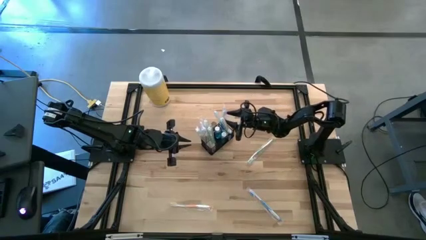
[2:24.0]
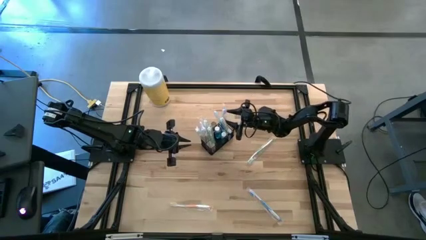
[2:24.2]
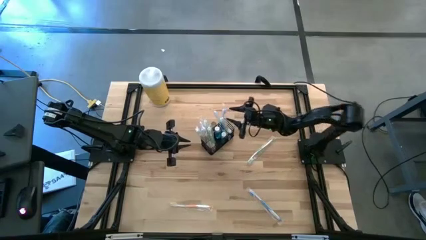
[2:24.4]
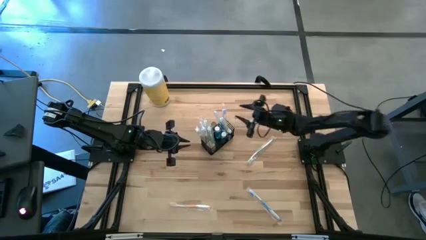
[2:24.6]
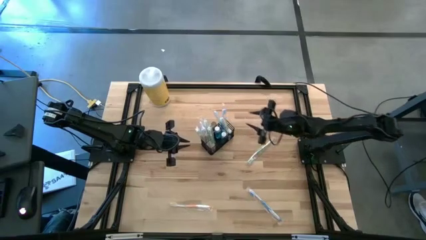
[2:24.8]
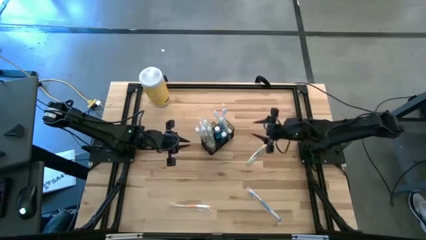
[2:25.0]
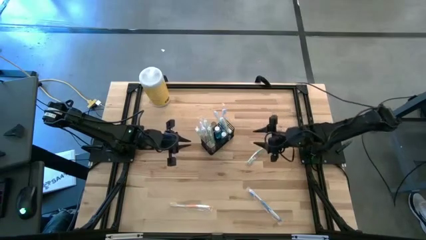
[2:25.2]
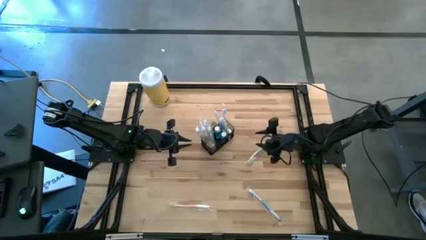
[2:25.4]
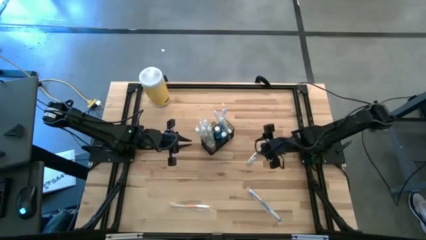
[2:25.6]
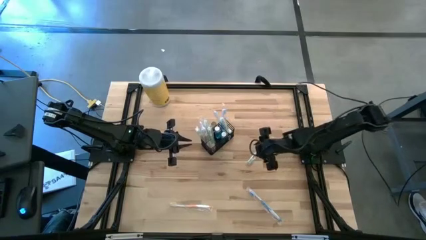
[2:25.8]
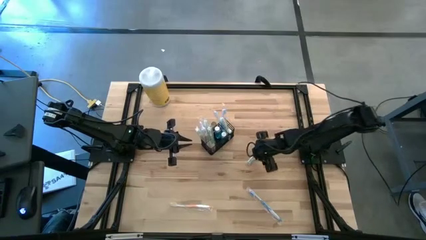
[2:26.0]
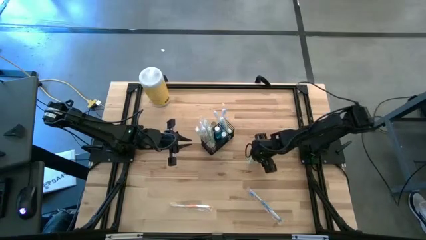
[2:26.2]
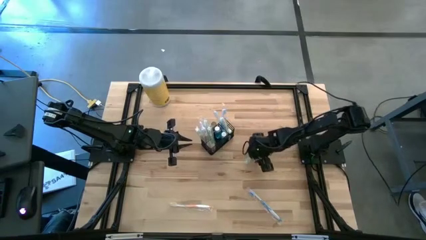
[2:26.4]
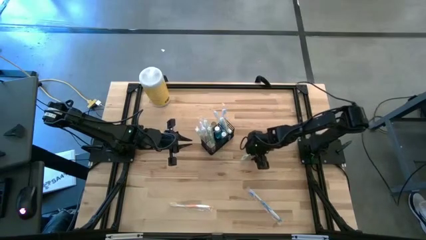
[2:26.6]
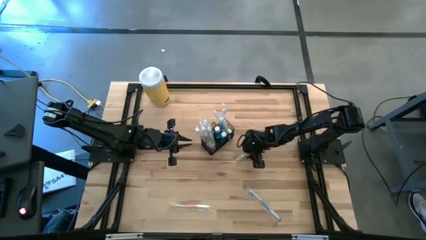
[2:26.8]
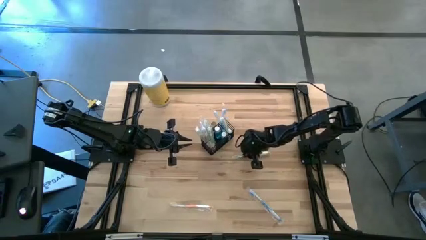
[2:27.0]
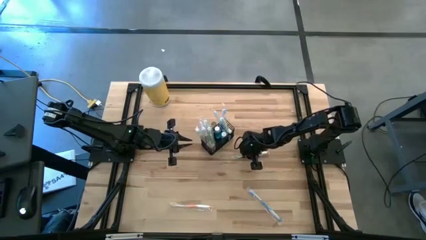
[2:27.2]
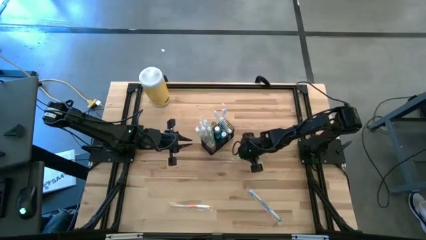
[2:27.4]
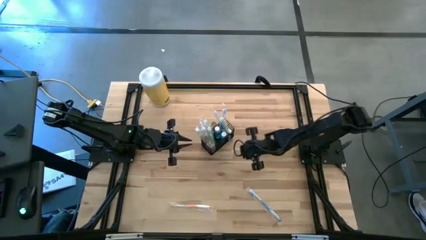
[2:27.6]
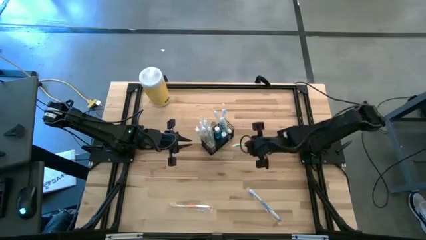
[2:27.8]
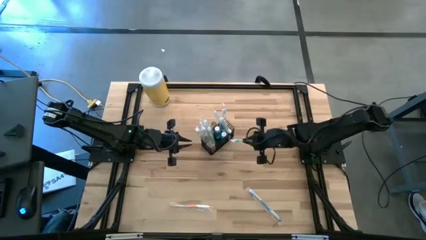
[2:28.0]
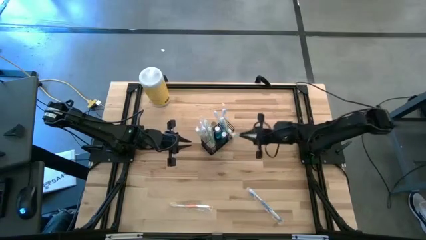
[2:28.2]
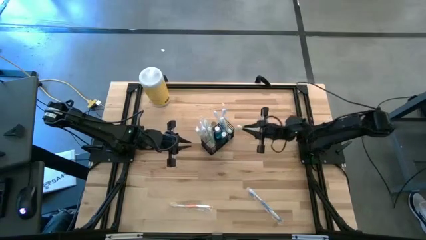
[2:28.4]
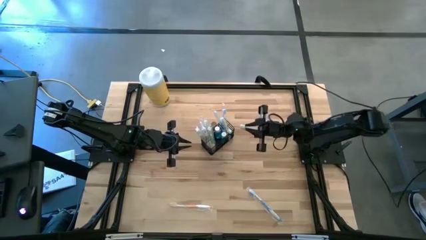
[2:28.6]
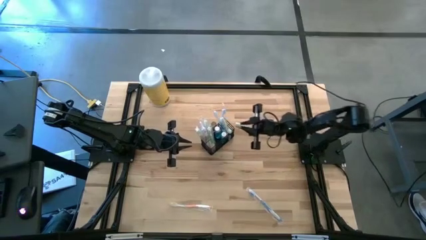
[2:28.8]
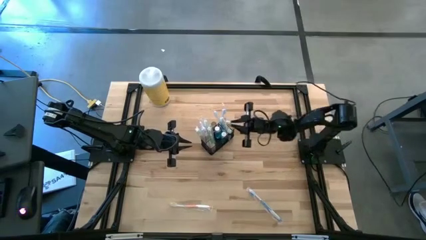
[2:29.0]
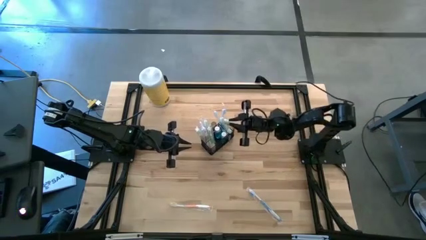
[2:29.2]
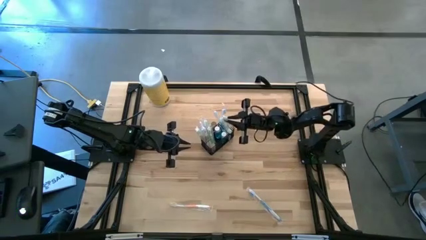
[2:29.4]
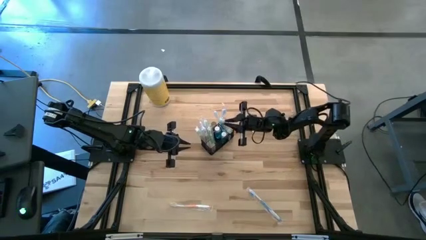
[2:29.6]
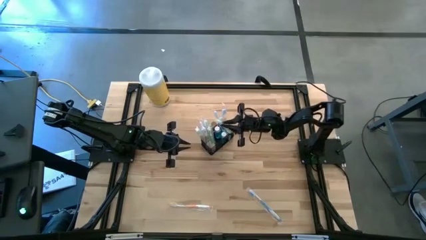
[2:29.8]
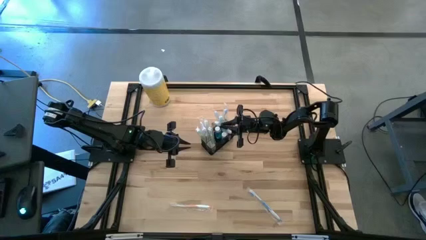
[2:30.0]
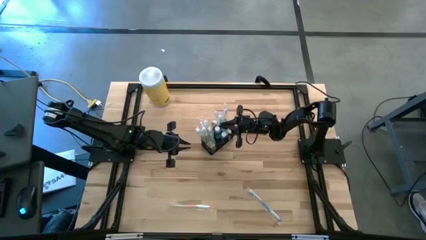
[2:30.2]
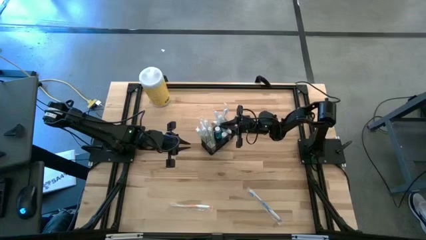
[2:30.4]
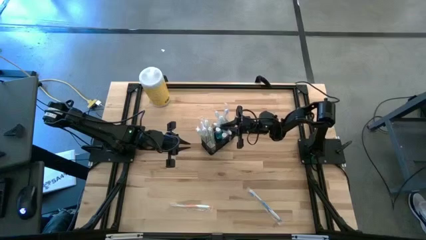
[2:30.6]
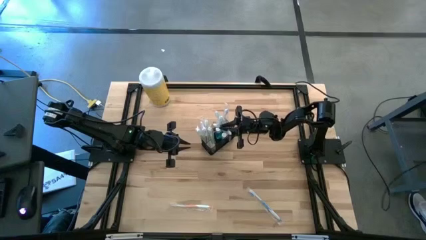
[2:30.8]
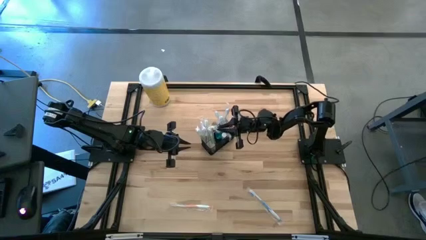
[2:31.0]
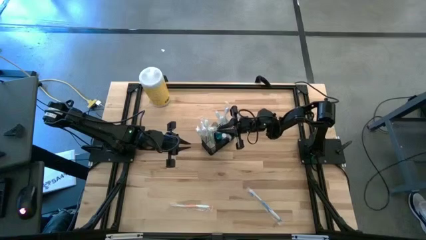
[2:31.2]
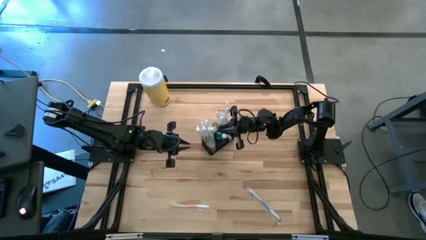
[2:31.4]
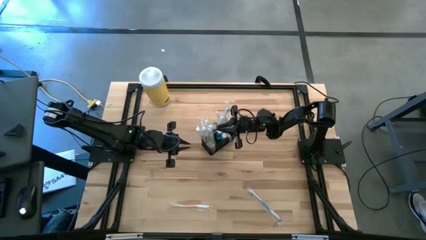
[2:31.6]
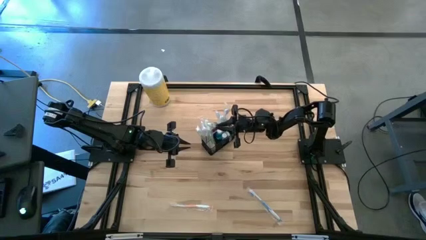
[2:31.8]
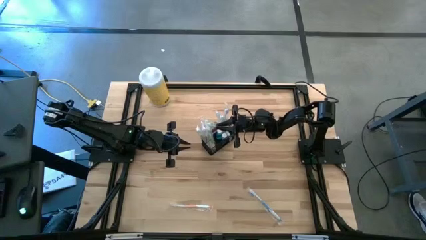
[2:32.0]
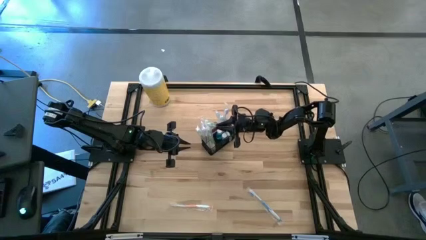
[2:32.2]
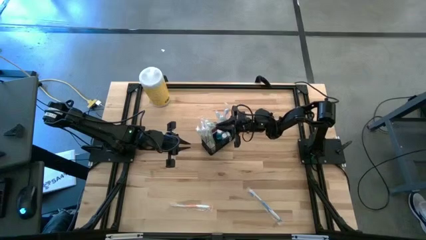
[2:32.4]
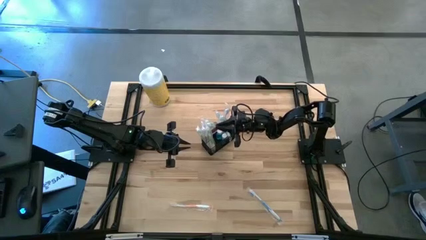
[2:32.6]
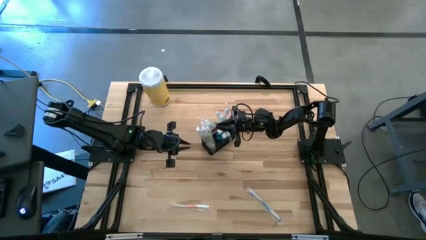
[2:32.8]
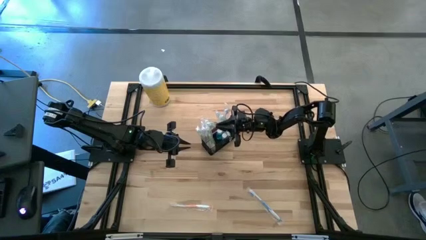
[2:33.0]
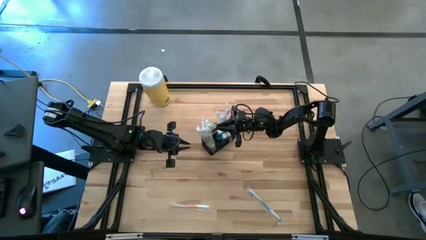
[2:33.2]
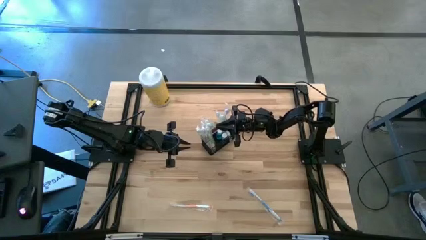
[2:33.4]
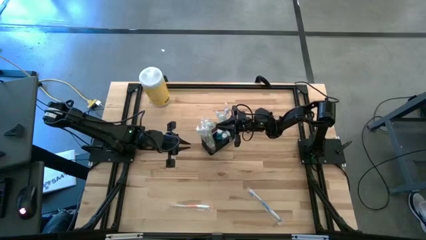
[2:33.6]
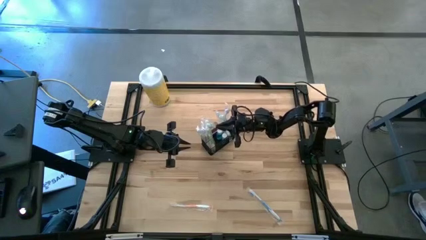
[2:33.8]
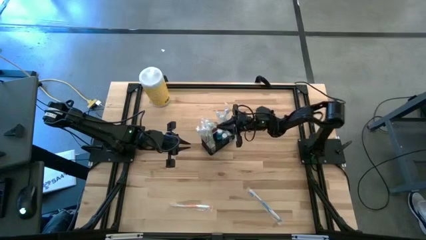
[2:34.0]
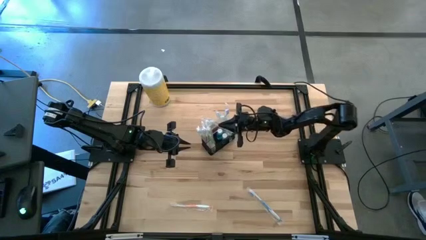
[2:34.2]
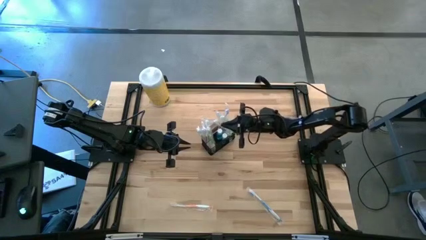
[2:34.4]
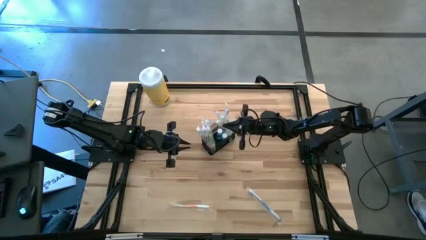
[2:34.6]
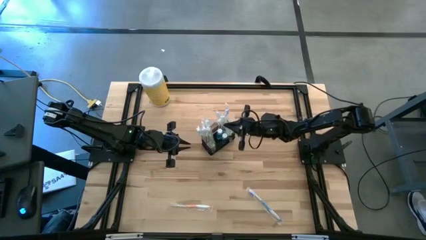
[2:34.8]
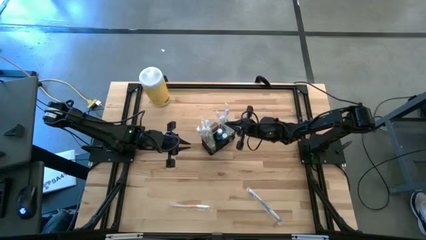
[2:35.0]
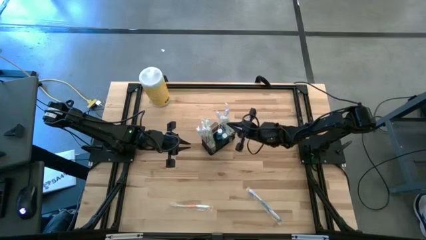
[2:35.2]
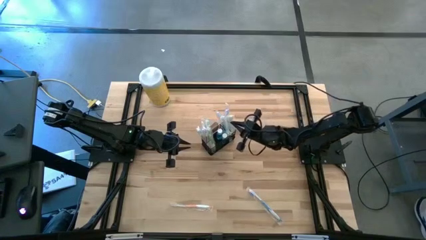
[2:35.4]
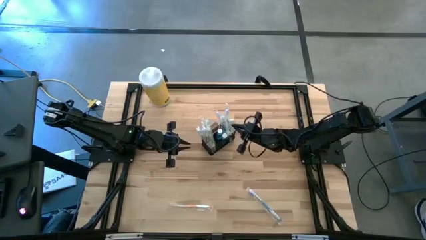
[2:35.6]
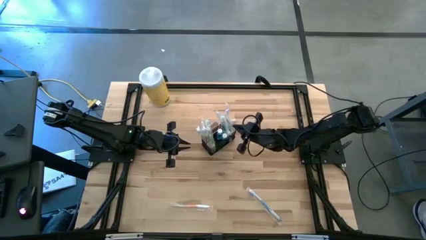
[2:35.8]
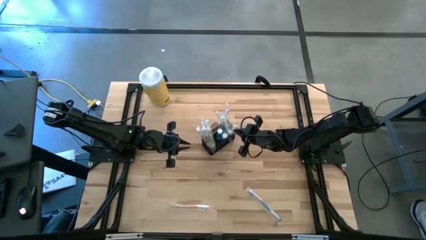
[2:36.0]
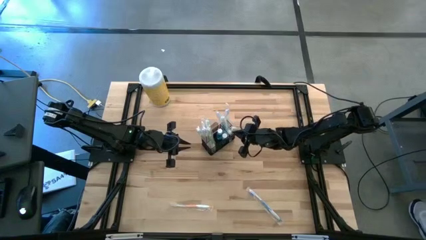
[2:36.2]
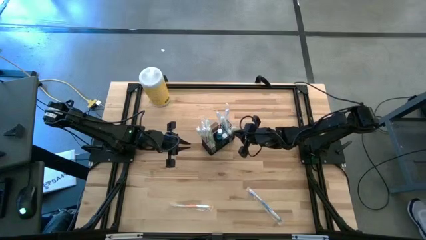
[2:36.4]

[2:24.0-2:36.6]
Task: Pick & Place toothbrushing station
Put the green toothbrush into the wire organizer

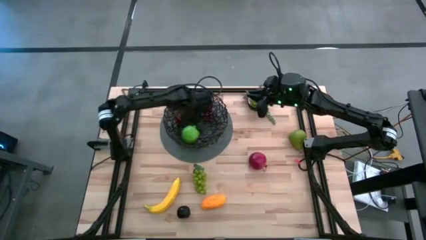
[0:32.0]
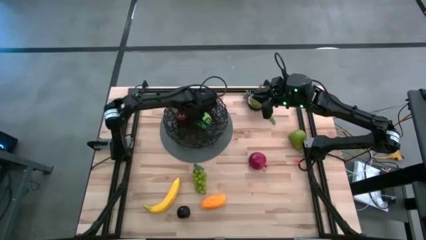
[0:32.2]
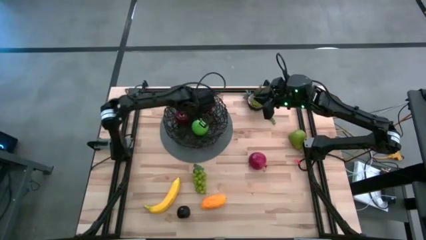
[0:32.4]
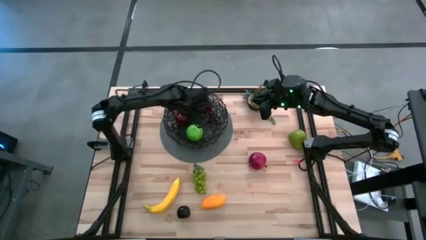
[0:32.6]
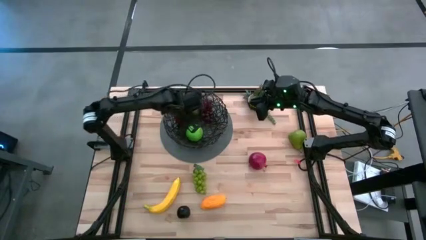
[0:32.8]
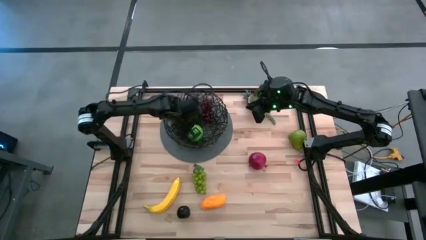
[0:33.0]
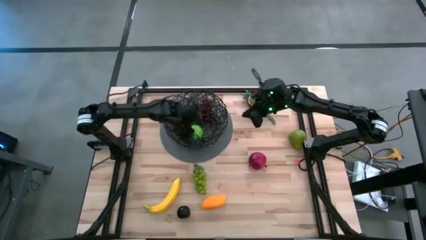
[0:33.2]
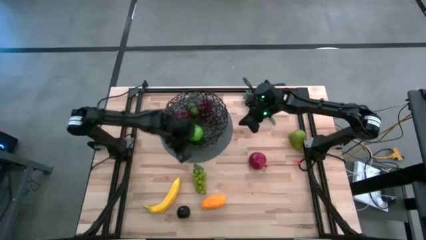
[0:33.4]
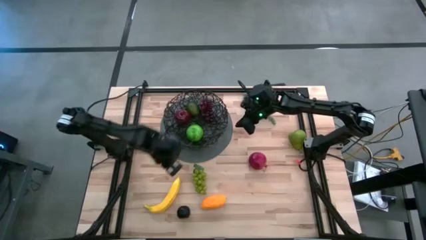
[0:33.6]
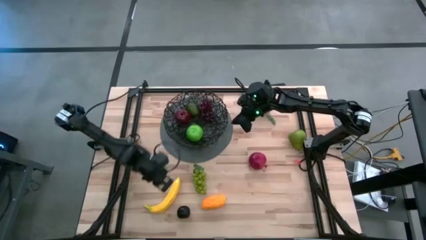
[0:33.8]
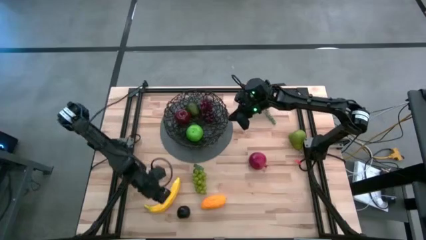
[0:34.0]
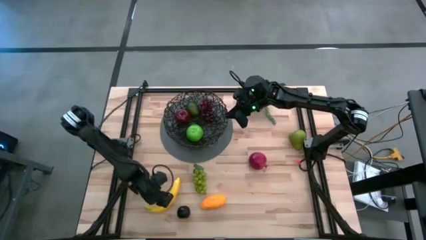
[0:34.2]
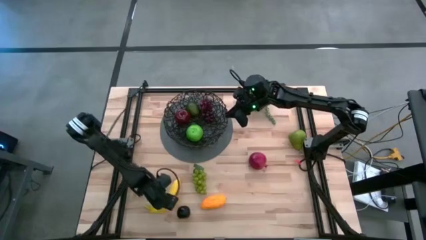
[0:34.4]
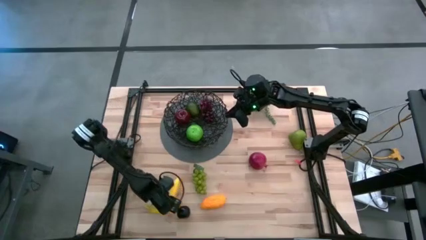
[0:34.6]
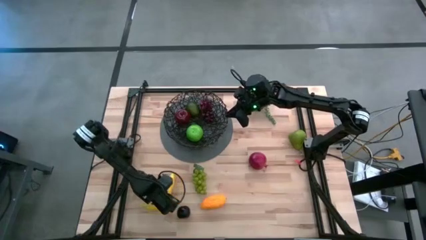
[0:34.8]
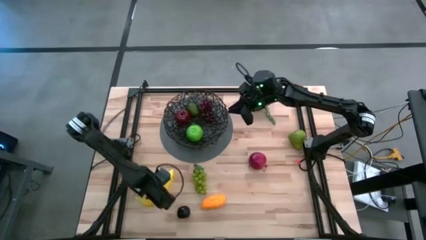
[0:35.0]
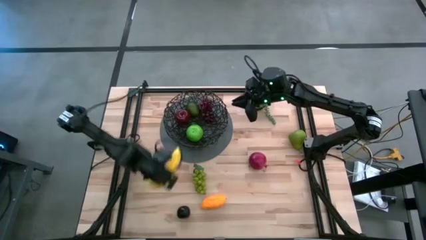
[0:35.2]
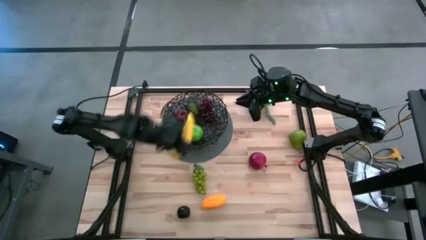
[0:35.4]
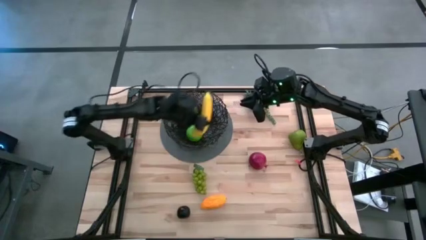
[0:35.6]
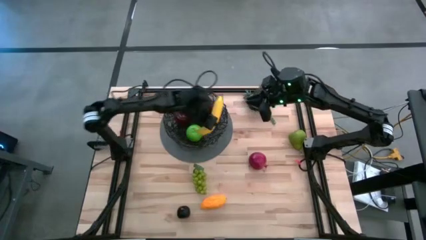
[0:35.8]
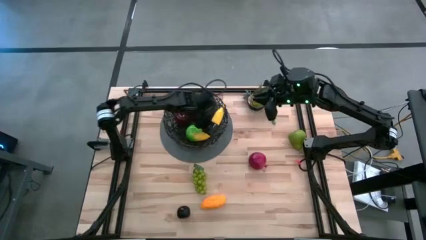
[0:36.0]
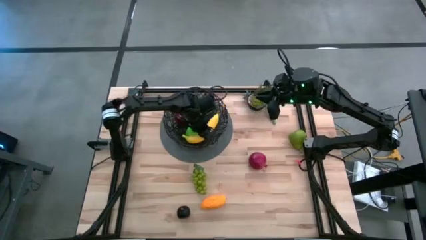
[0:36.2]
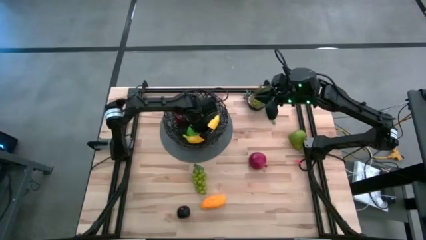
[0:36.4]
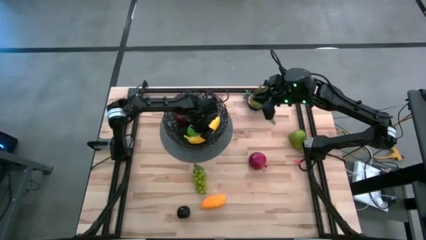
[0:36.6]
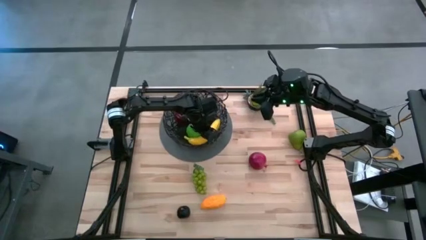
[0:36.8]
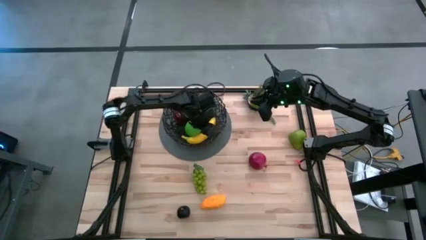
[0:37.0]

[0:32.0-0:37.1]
Task: Build produce basket
Put the yellow banana into the black wire basket
